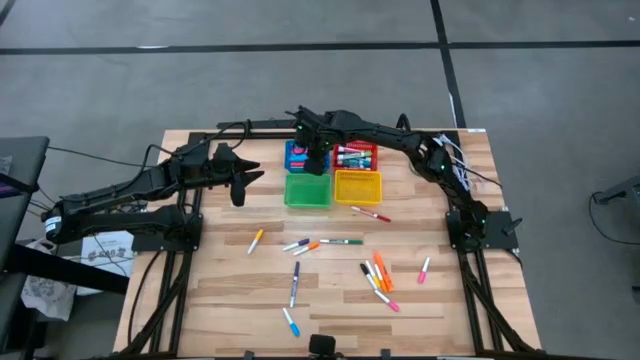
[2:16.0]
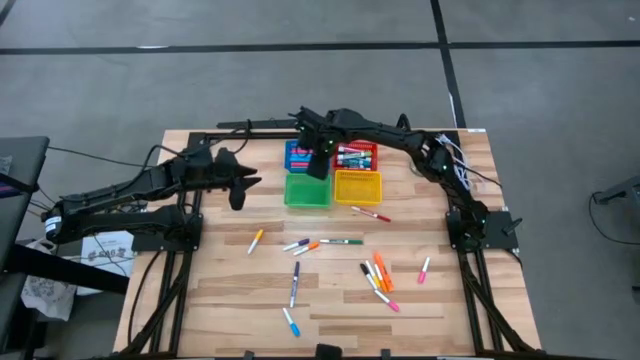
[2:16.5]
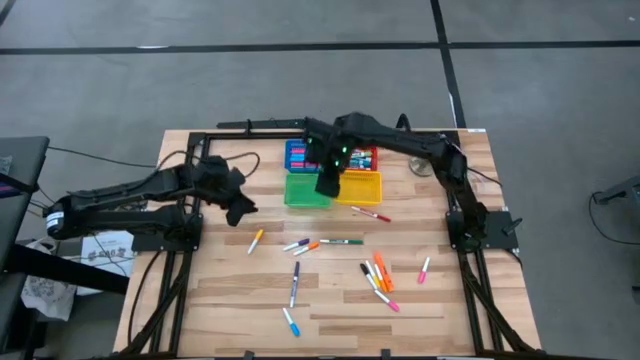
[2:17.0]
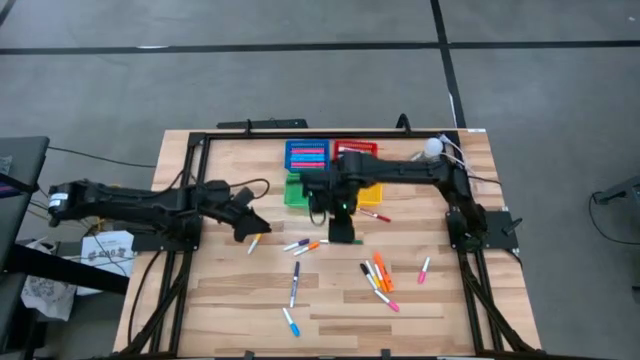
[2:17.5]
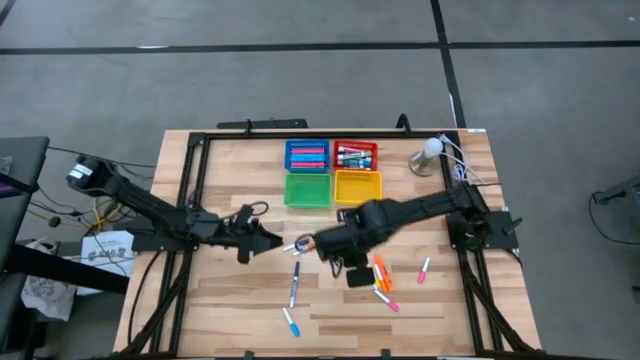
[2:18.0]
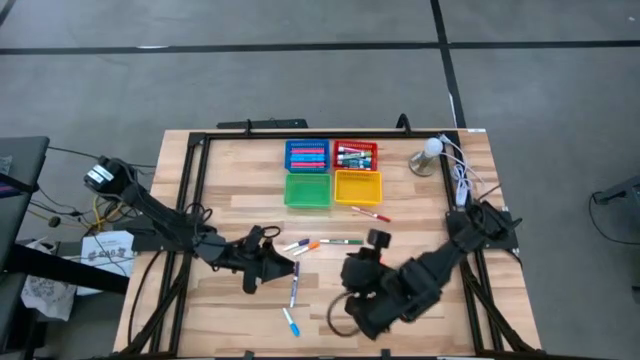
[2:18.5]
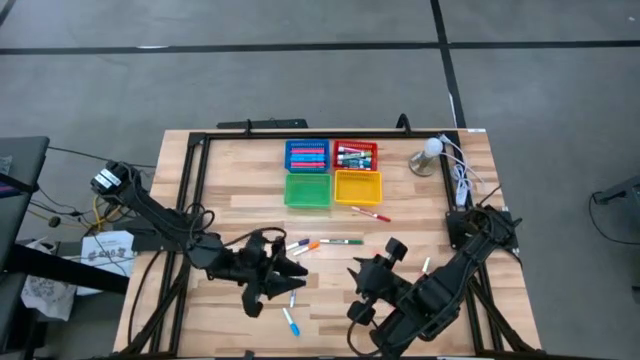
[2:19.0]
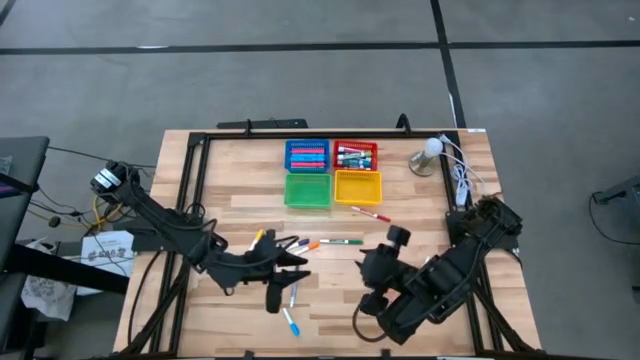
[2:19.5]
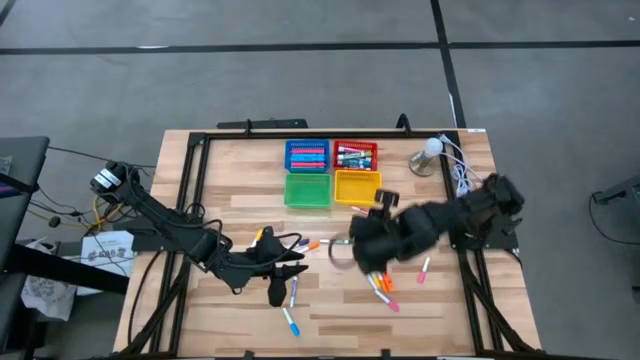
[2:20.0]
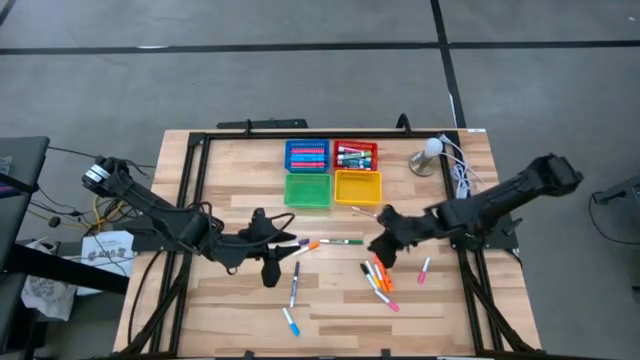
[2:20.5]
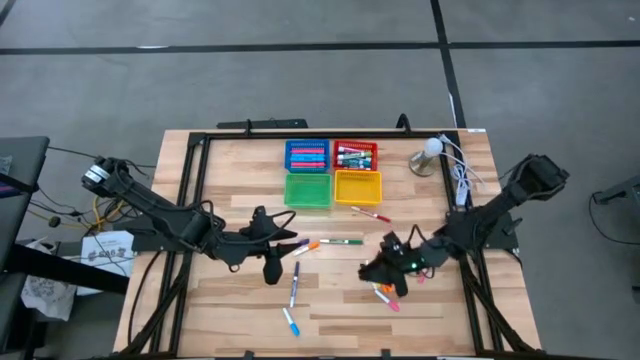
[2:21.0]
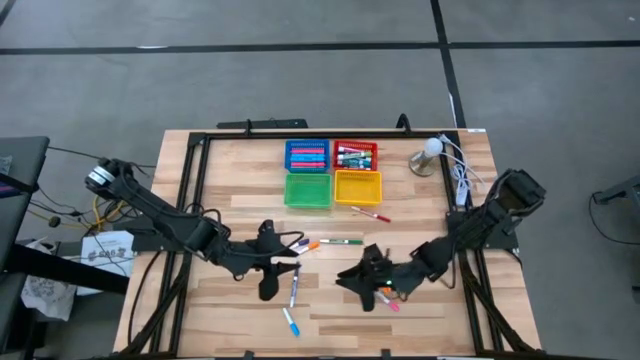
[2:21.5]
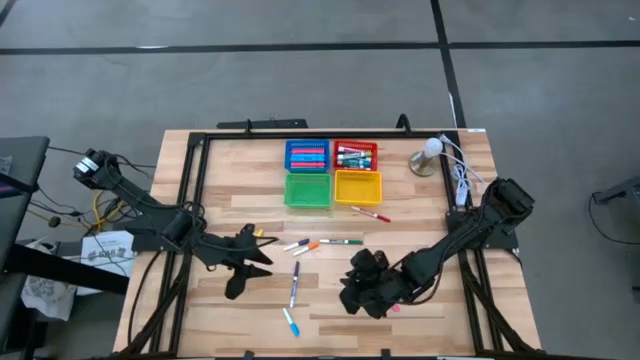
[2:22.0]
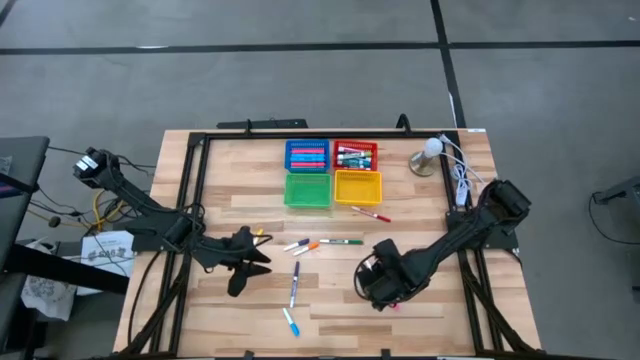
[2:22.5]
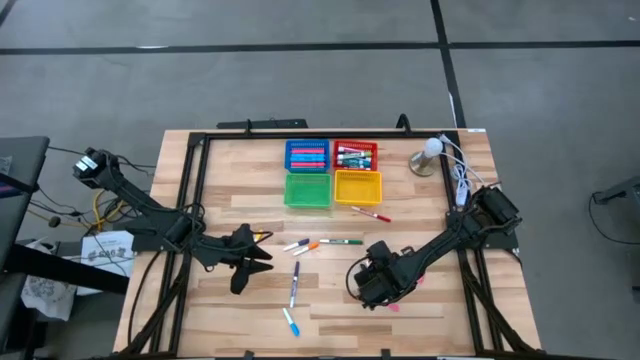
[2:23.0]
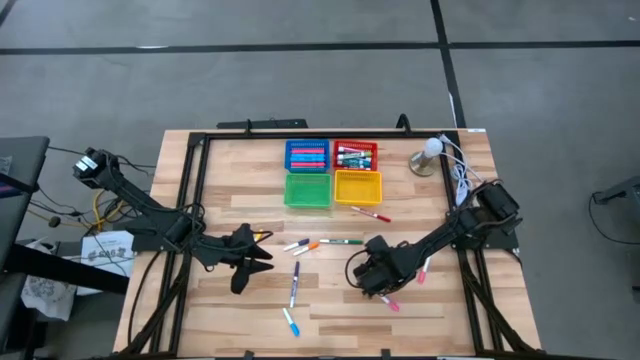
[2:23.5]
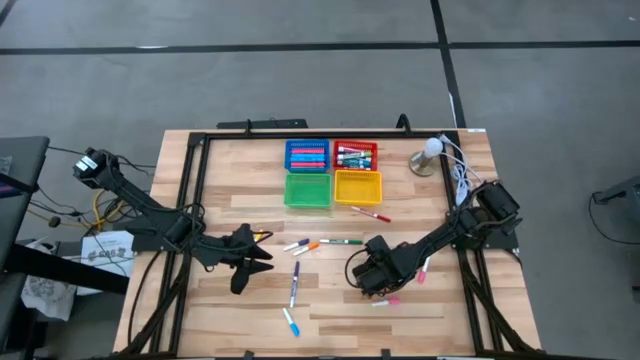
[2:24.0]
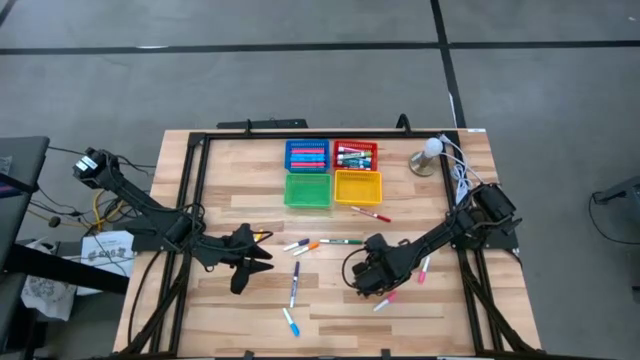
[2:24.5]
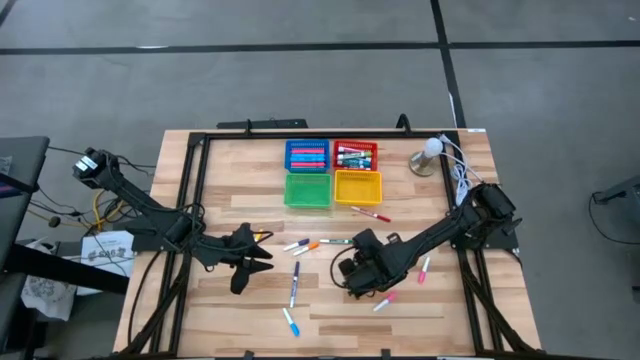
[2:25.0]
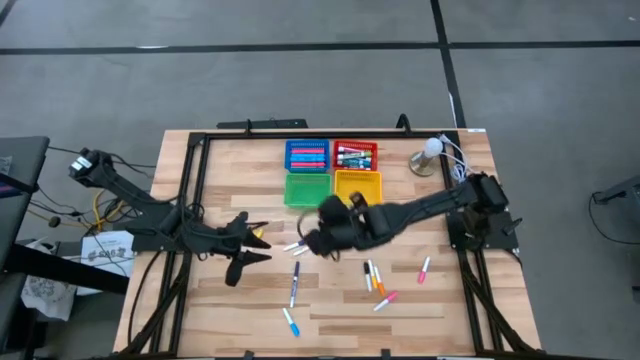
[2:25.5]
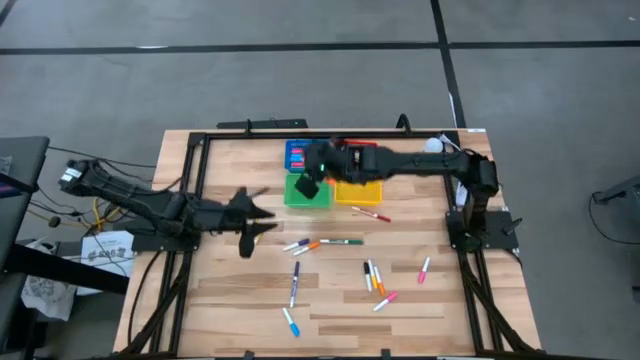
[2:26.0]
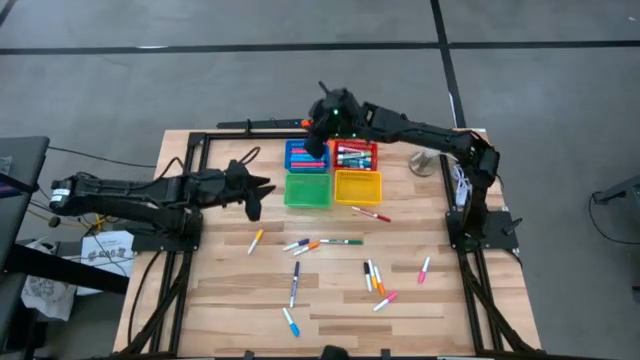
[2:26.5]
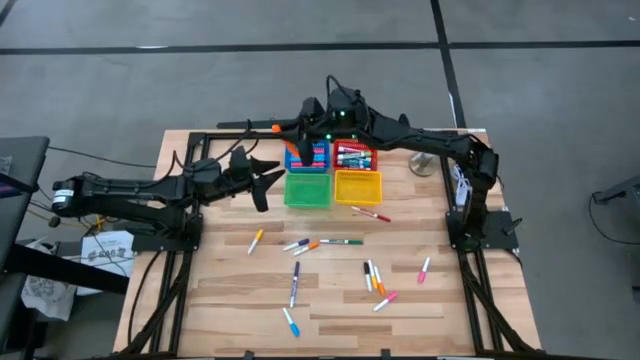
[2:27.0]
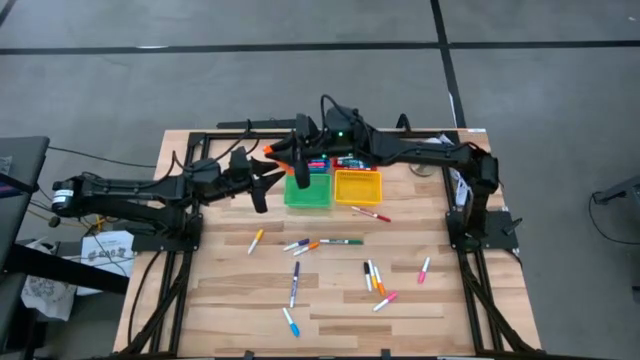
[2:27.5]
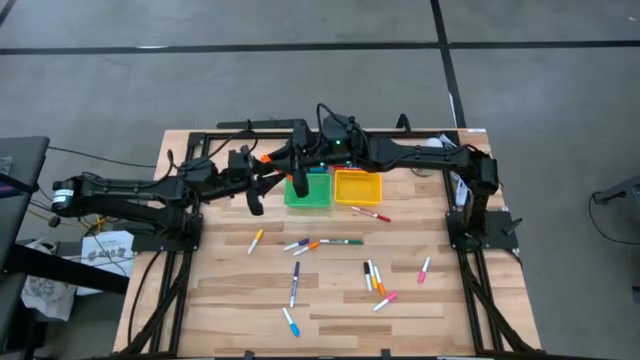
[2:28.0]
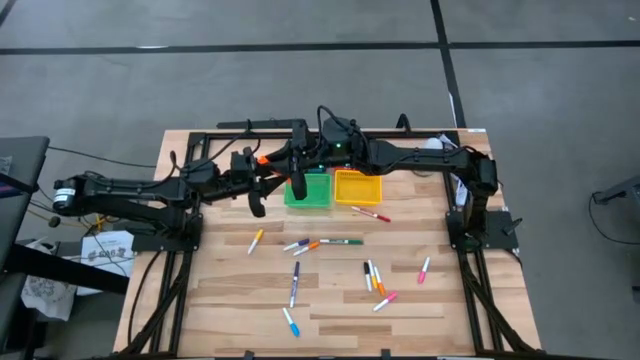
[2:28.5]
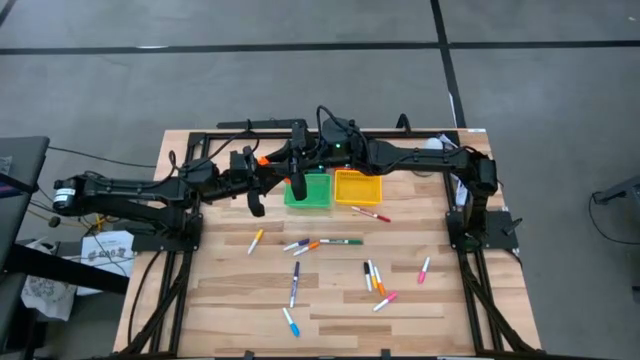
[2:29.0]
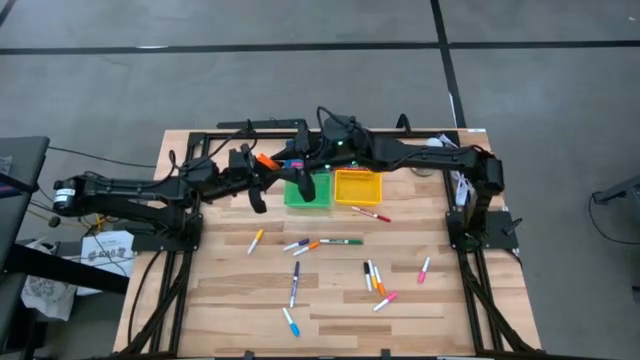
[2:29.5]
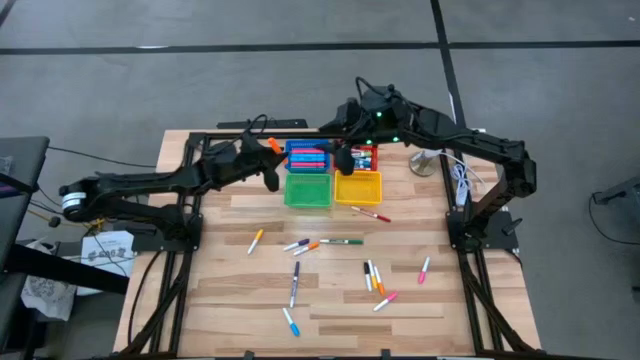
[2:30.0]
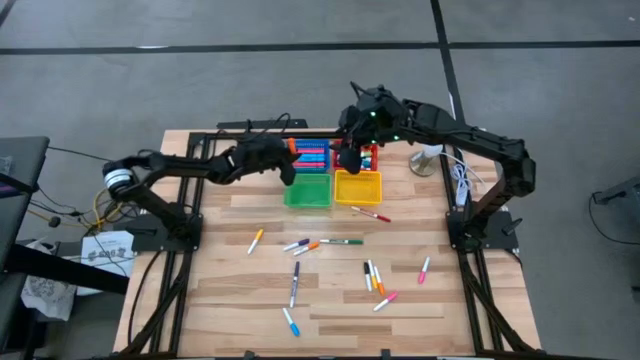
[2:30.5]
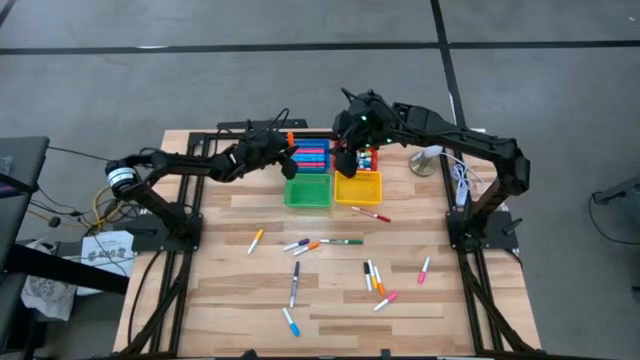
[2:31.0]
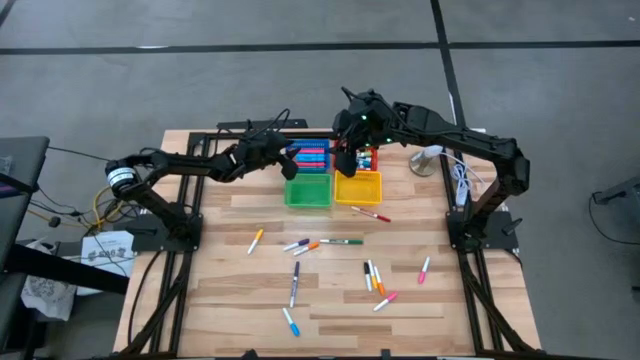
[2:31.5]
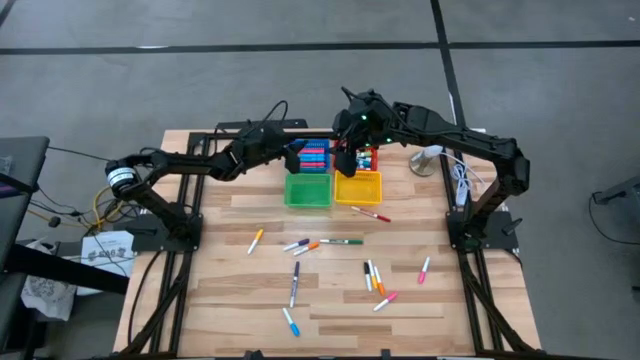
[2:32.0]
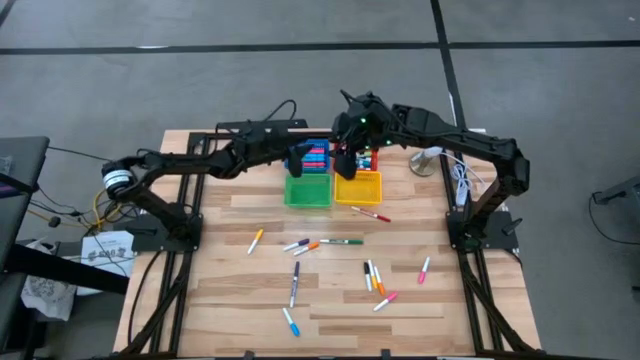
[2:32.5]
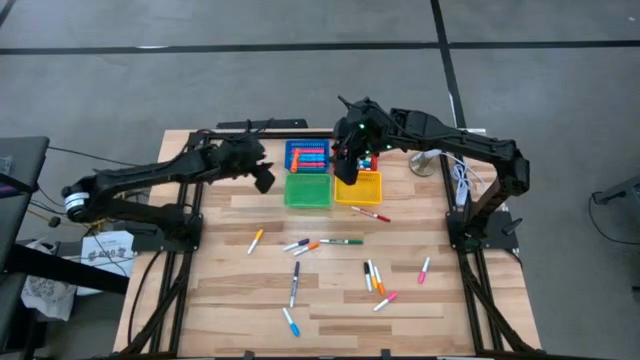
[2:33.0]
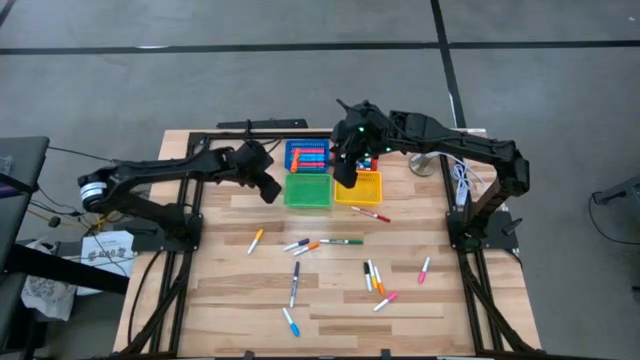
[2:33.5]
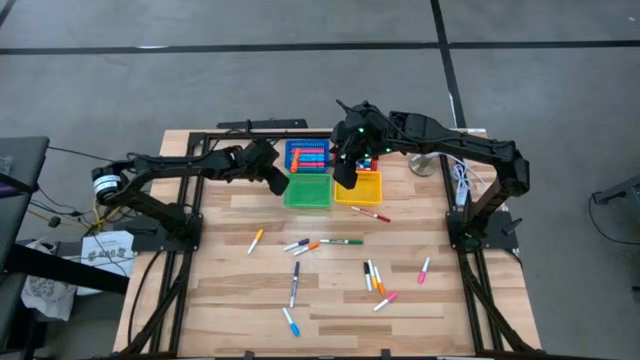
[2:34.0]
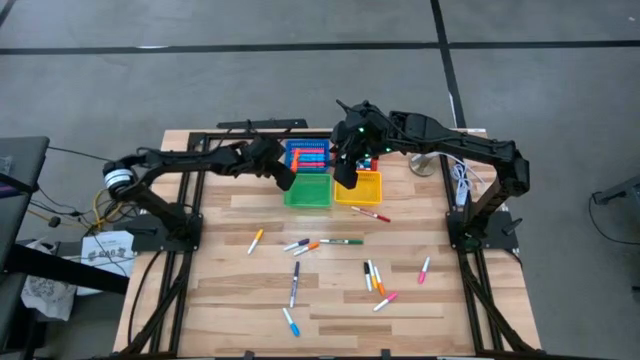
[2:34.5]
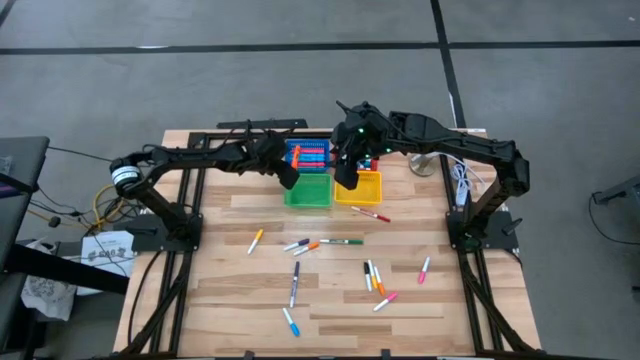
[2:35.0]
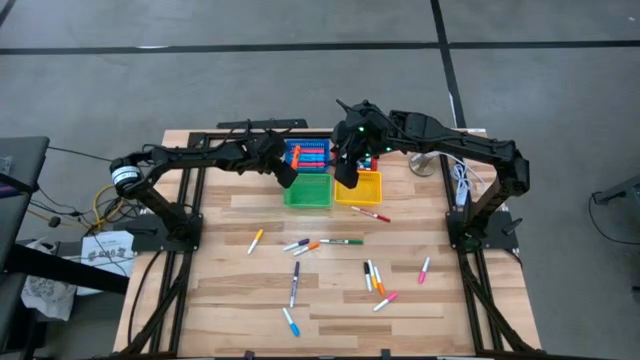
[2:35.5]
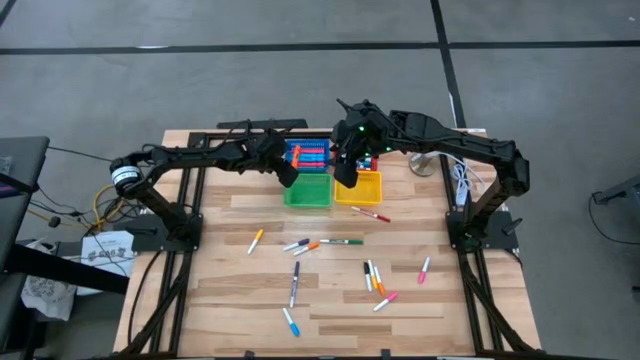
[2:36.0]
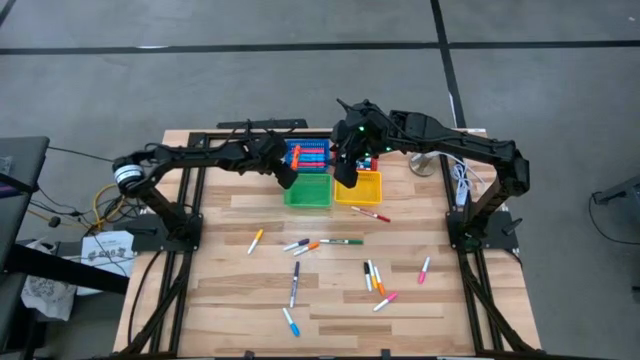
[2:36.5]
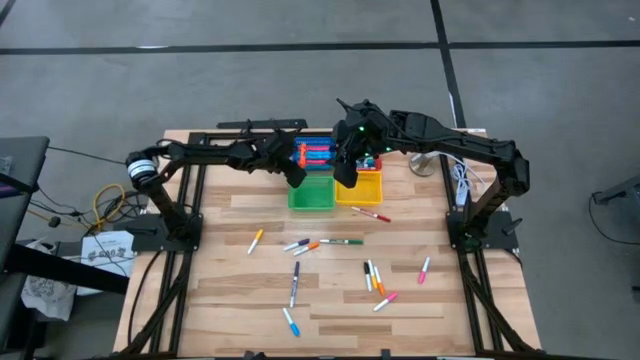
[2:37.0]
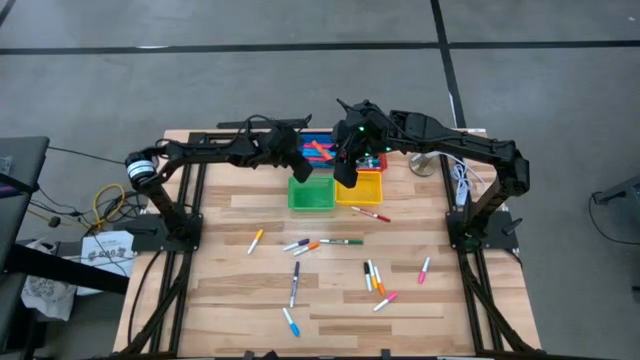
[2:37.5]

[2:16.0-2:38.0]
Task: Pick & Place Markers
Put the orange highlighter into the blue bin
